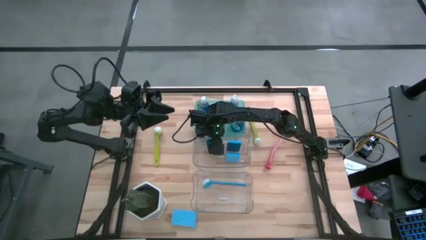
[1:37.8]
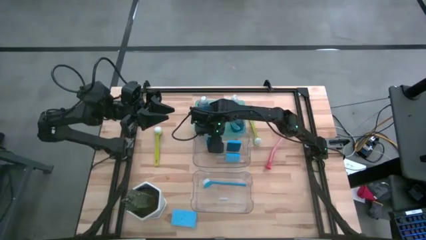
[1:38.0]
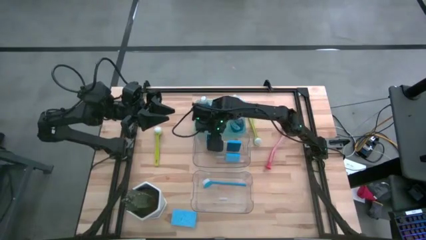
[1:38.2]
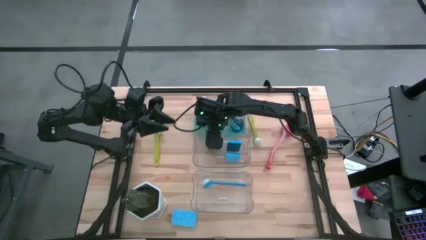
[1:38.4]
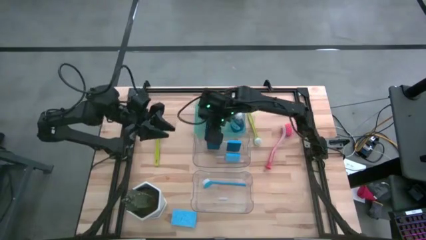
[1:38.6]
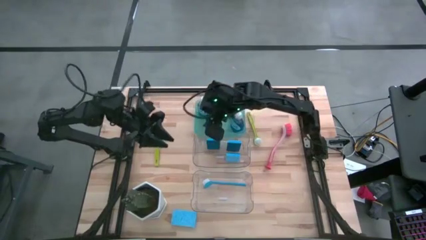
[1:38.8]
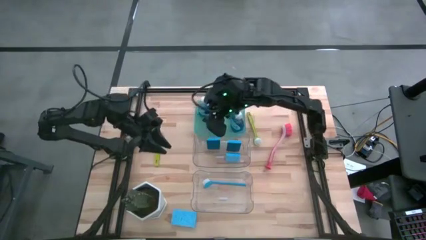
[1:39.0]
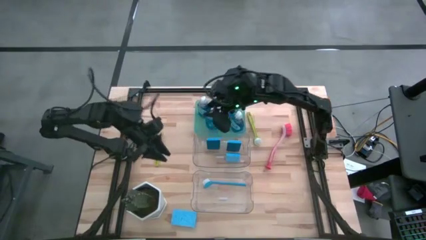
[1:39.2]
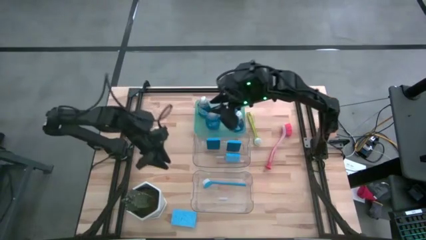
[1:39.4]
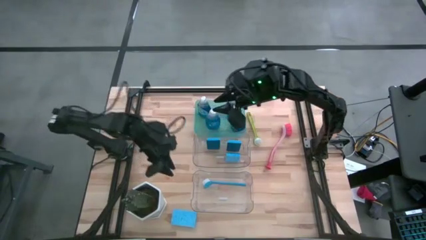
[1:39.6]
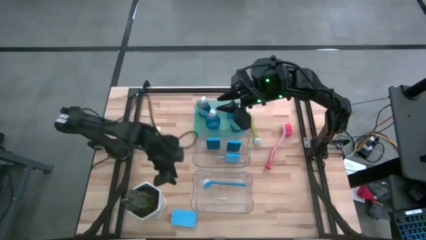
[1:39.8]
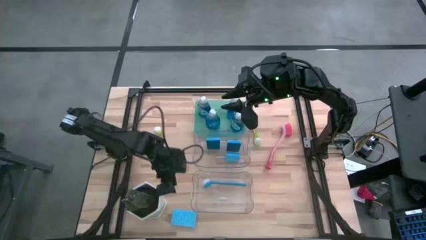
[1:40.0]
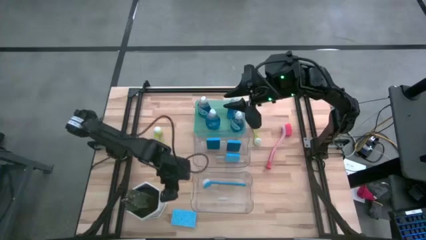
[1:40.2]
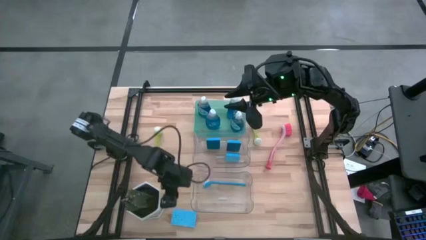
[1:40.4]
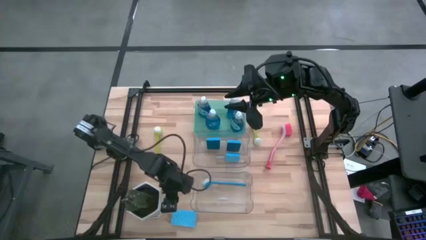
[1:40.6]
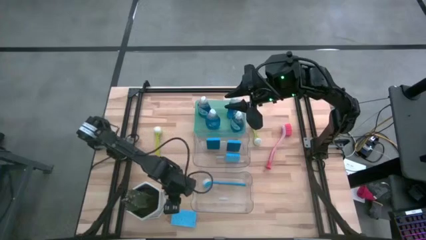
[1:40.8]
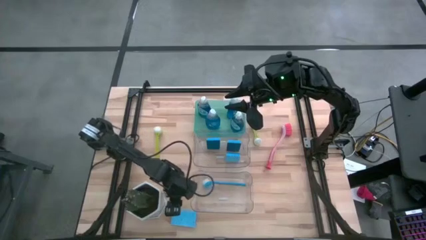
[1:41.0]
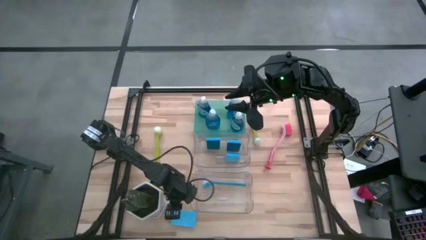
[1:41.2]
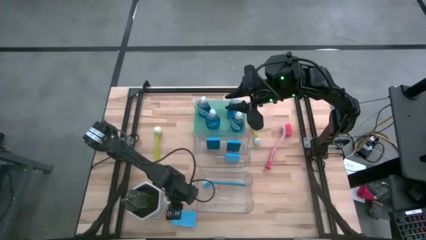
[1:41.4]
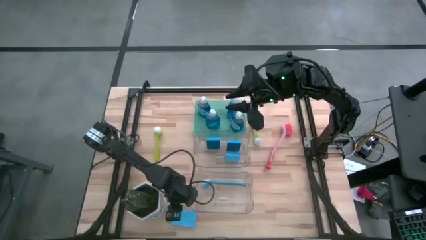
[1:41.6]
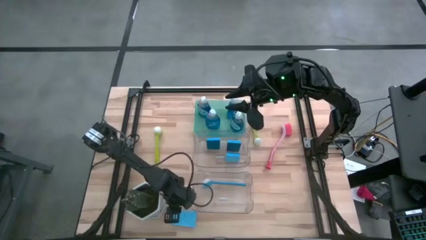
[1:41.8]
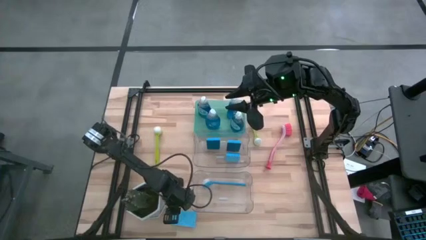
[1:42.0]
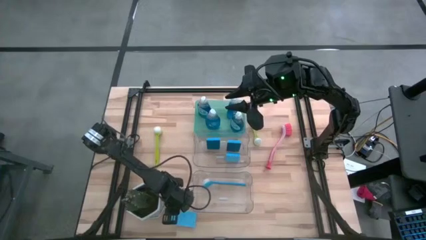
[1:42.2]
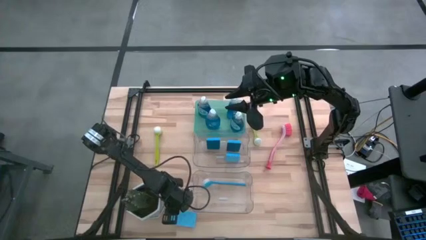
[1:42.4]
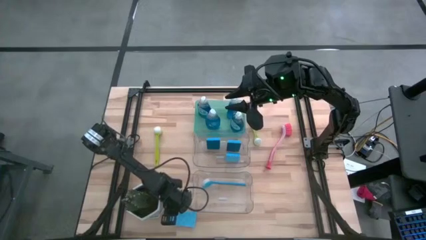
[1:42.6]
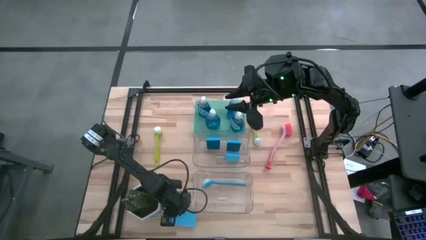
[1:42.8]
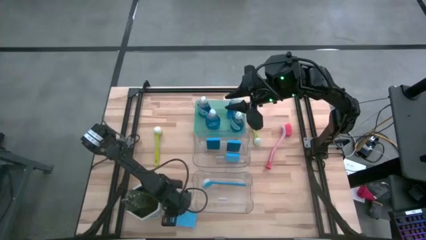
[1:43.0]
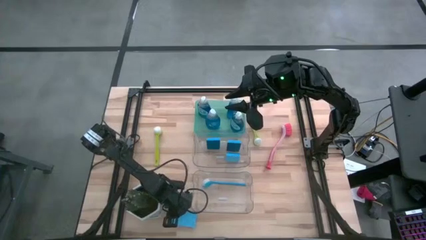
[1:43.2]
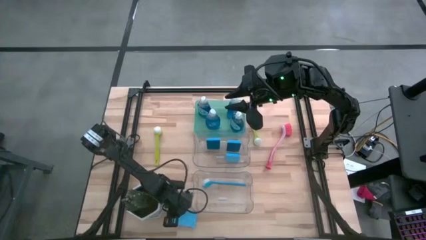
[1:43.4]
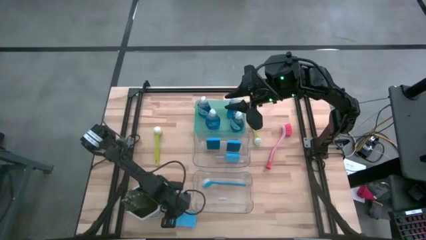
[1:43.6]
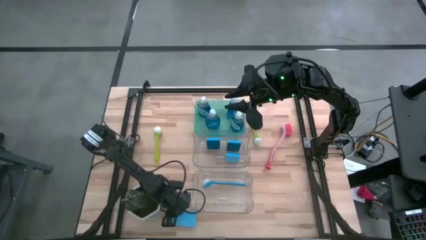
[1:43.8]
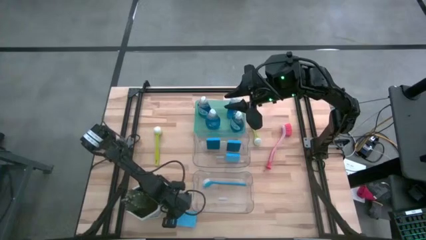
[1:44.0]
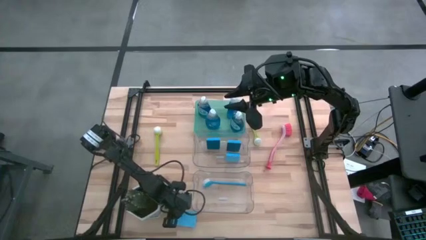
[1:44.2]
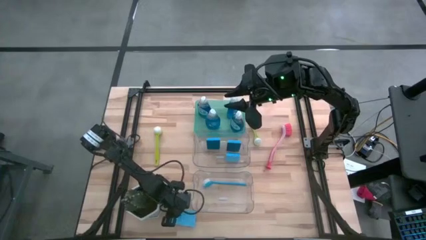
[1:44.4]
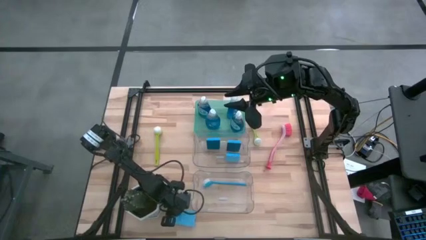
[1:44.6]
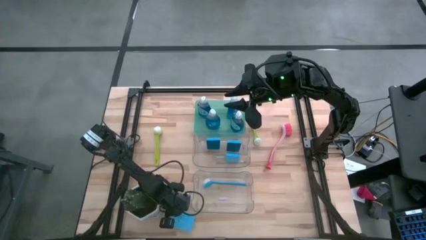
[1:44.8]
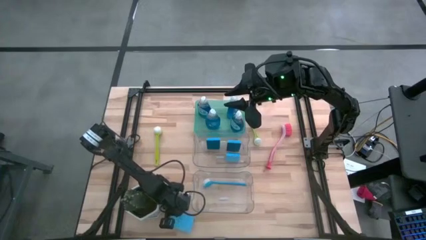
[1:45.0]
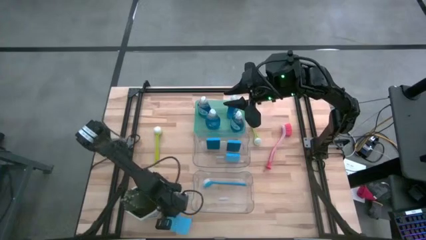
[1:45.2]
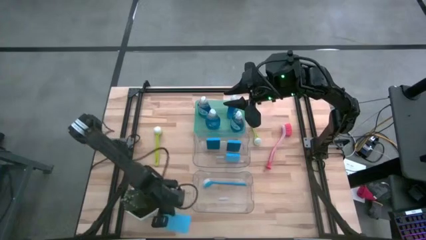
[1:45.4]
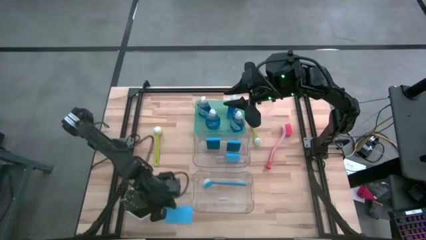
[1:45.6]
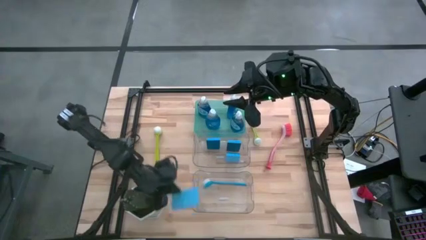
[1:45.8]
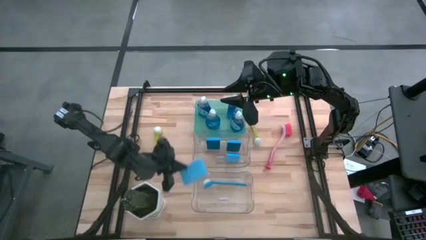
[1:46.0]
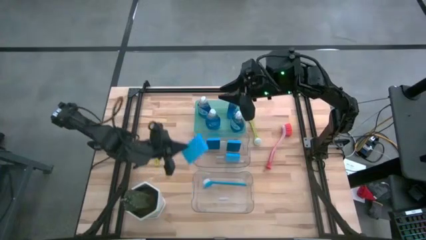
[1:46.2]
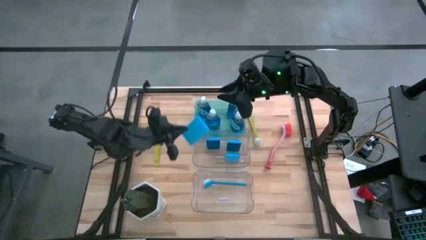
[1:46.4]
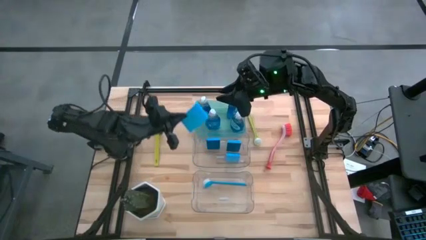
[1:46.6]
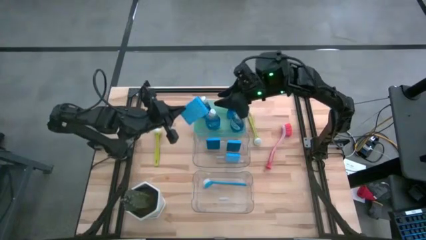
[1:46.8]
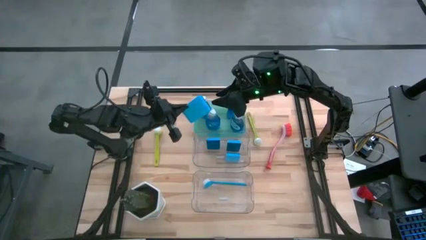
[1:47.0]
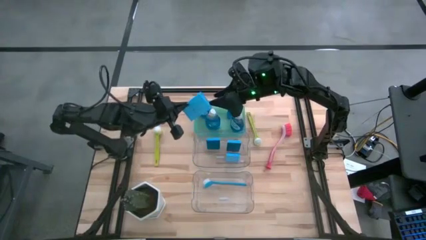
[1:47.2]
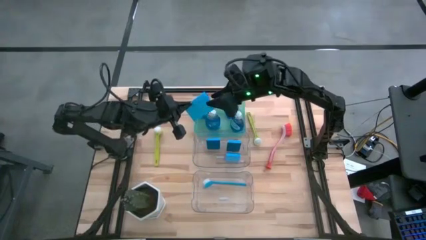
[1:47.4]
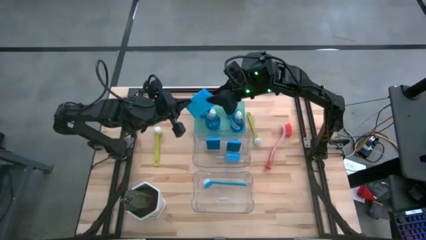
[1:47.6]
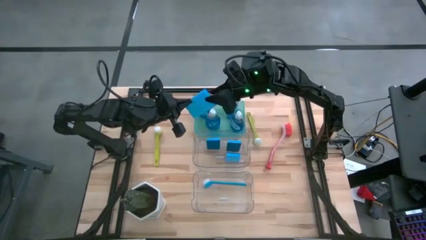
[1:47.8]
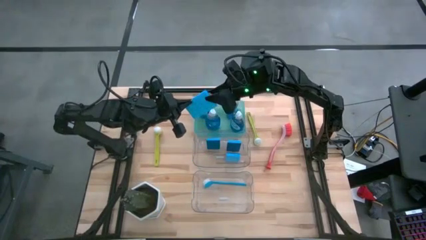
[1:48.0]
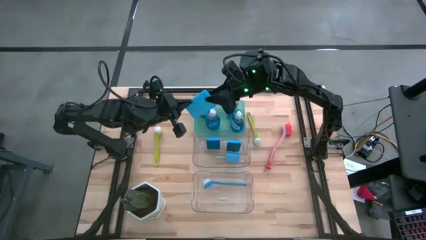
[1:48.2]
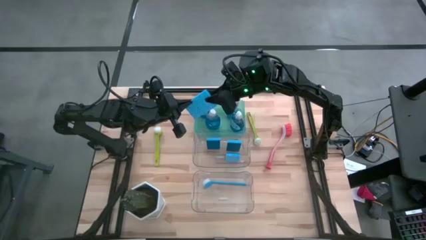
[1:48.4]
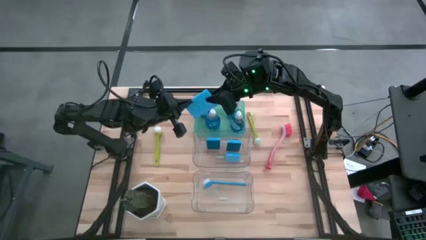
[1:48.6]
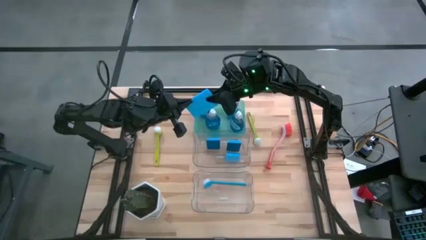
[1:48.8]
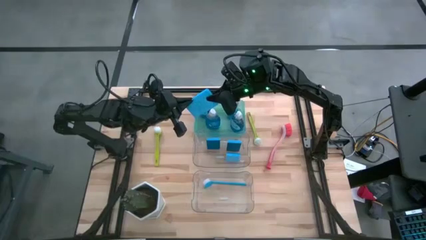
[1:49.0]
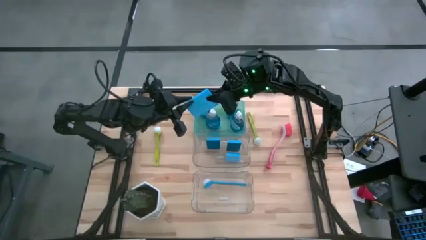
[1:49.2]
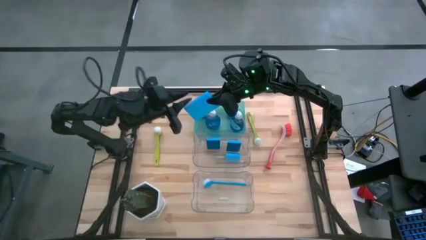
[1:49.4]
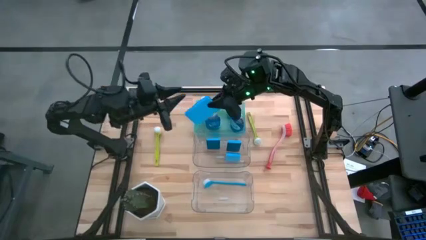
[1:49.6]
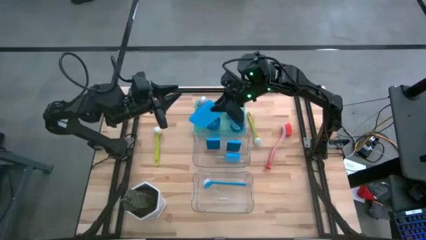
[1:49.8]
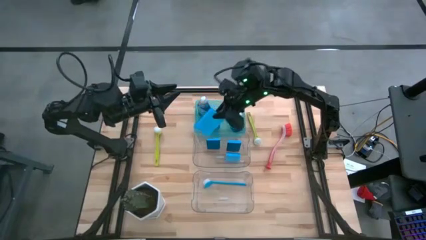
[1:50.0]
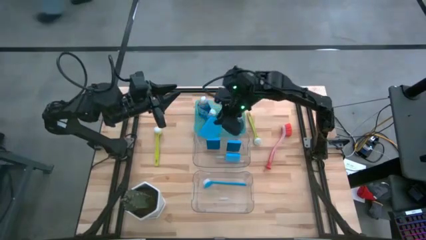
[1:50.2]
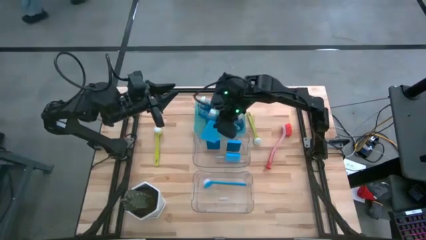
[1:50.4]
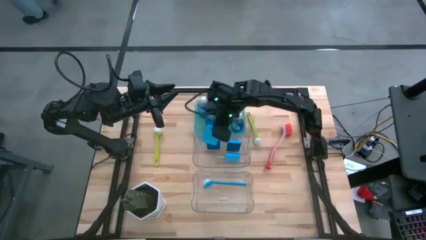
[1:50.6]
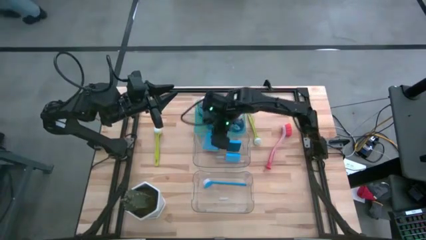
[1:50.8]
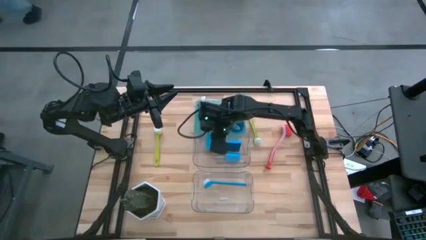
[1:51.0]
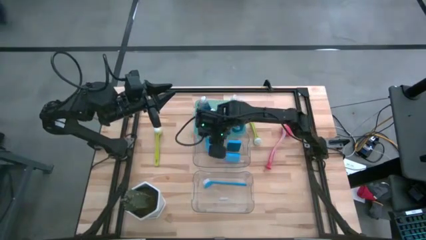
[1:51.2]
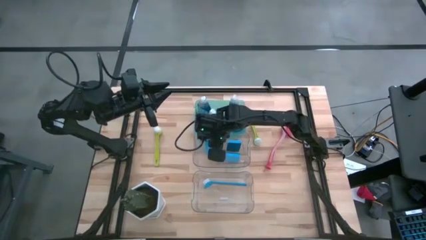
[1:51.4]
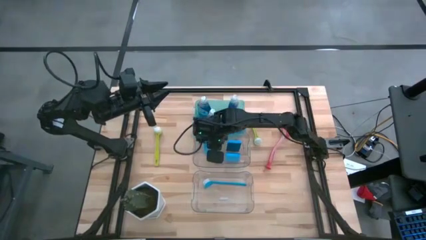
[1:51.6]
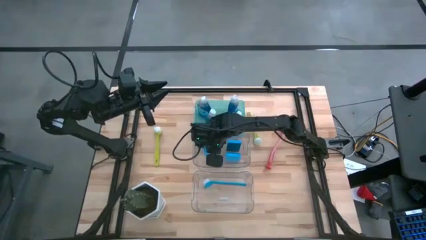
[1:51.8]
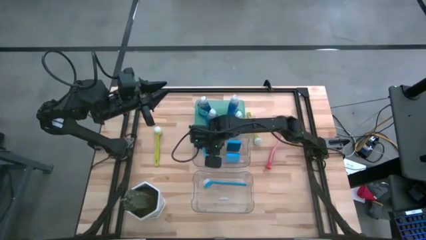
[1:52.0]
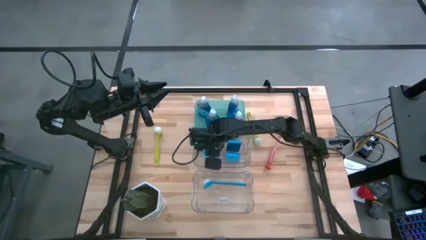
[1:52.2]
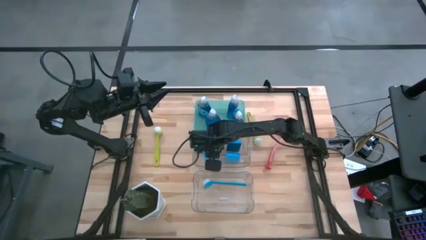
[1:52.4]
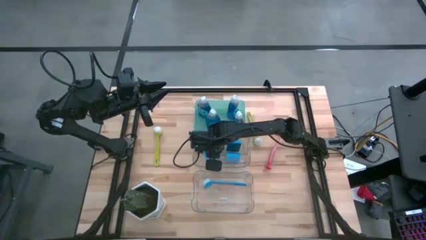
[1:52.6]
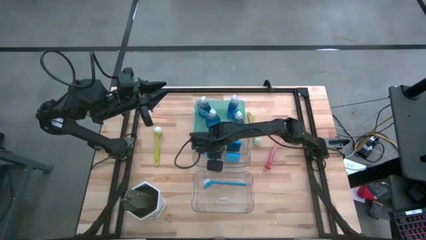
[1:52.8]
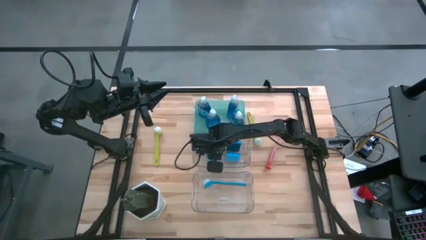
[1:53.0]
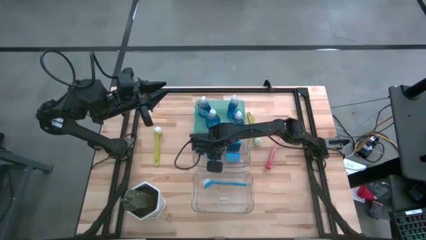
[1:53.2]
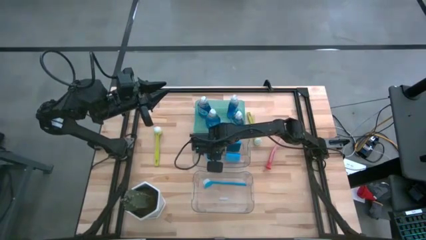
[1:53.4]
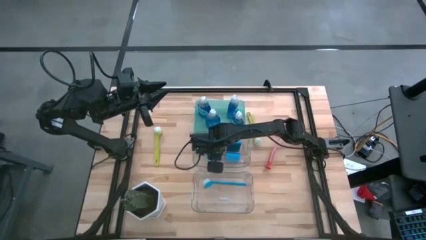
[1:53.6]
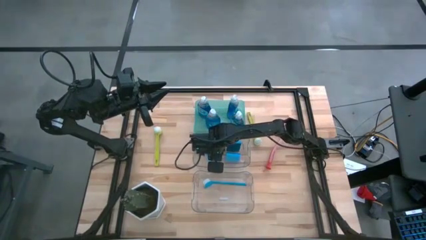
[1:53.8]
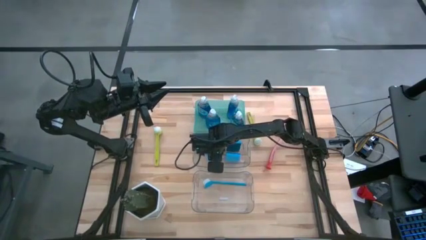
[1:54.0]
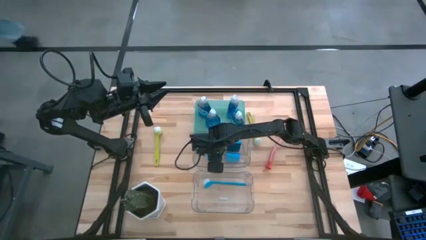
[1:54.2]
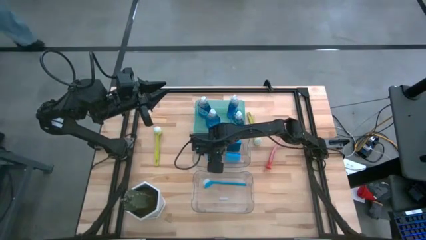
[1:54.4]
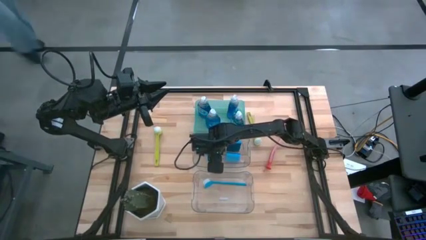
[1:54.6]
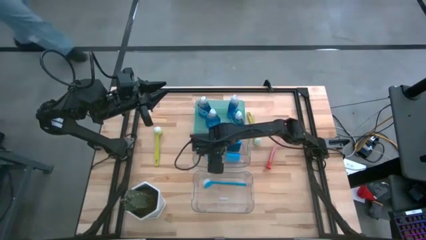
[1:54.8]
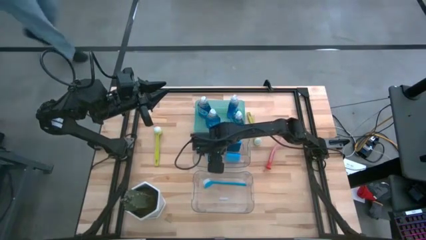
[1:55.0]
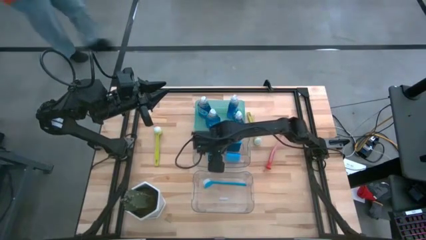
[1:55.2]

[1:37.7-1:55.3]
Task: Pick & Place Kitchen Sink Supplies
Put the blue sponge into the top transparent bin
